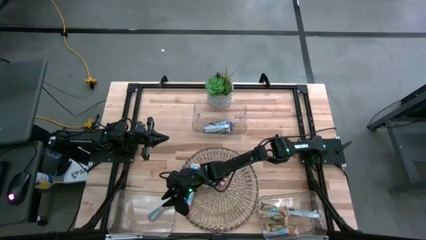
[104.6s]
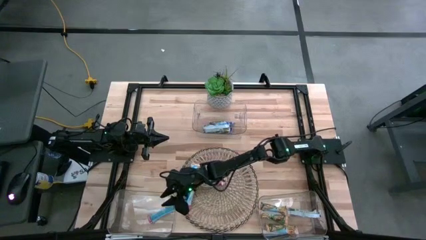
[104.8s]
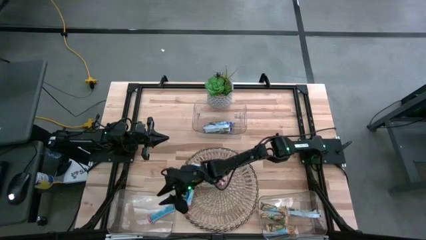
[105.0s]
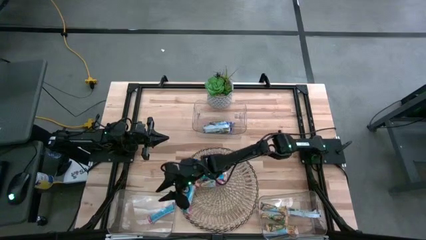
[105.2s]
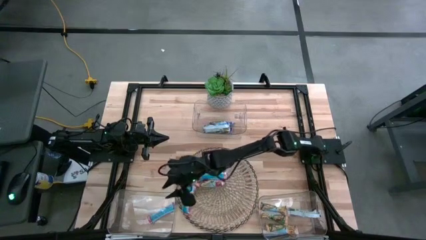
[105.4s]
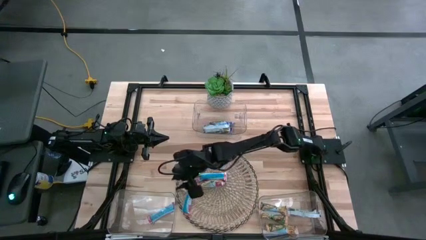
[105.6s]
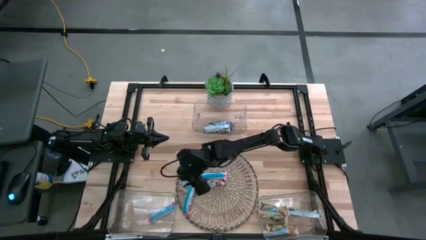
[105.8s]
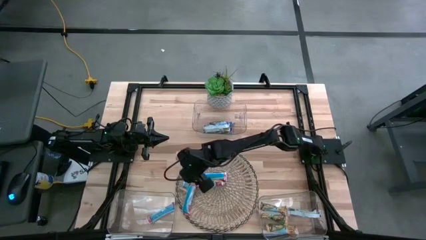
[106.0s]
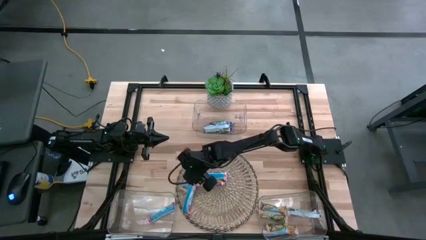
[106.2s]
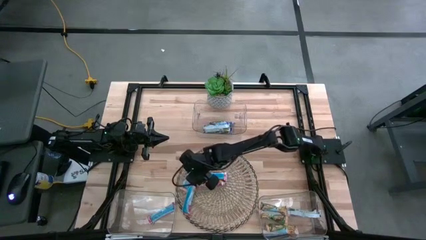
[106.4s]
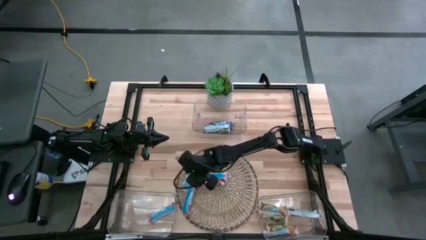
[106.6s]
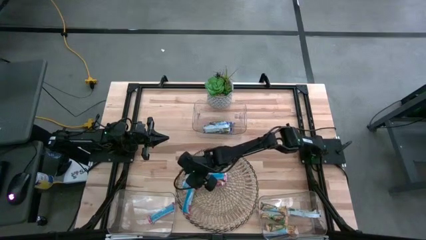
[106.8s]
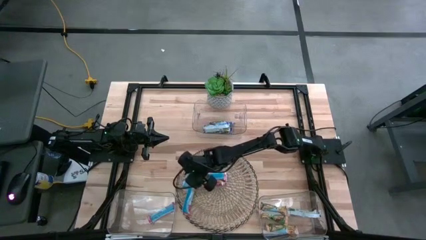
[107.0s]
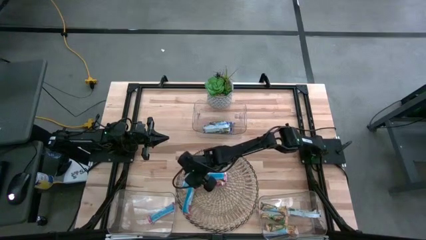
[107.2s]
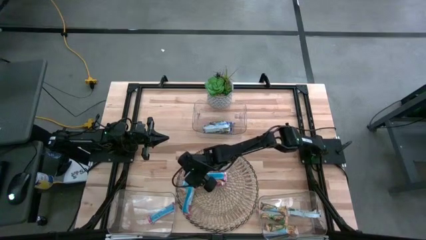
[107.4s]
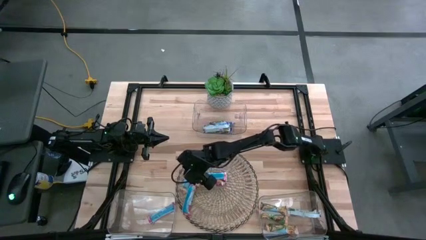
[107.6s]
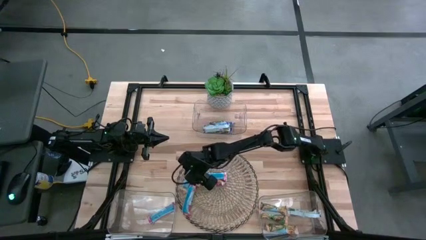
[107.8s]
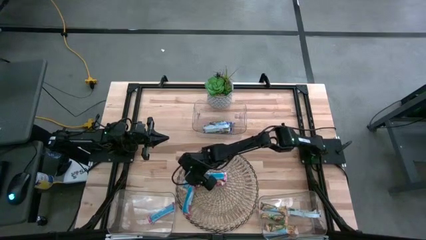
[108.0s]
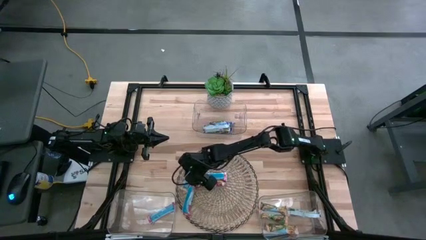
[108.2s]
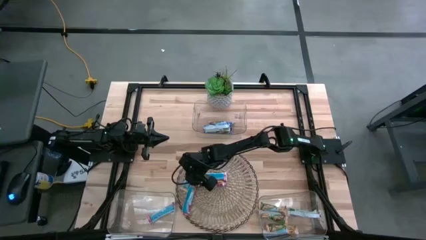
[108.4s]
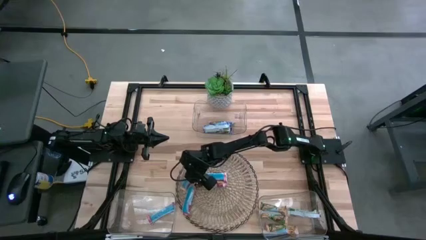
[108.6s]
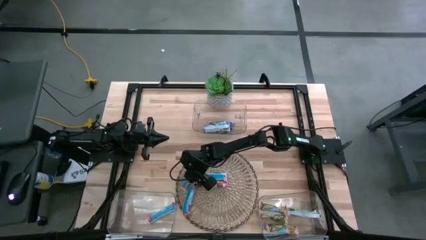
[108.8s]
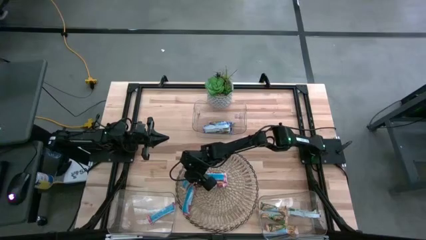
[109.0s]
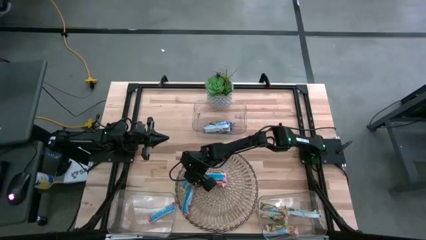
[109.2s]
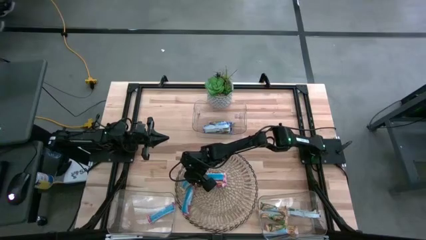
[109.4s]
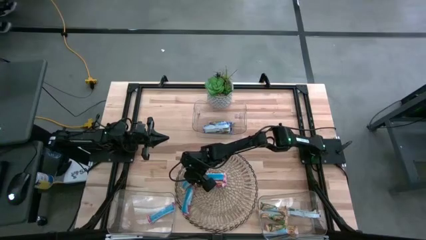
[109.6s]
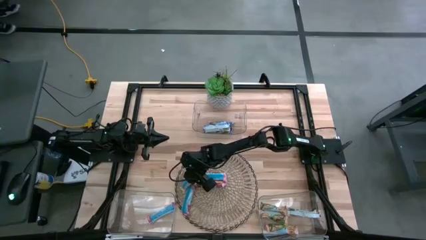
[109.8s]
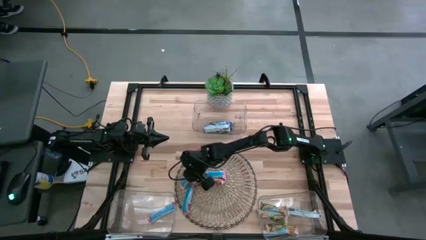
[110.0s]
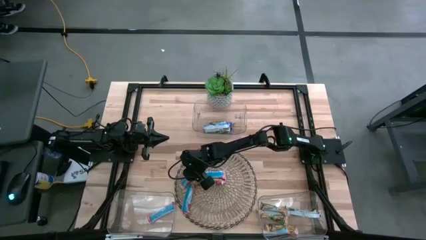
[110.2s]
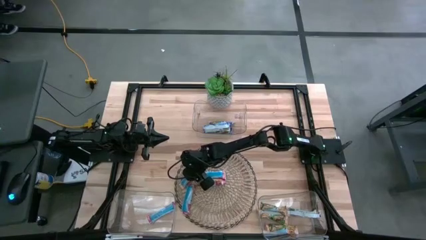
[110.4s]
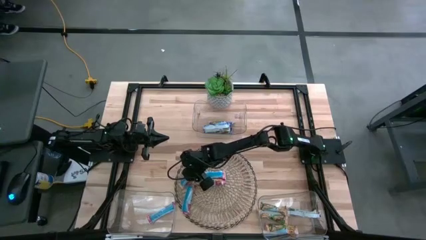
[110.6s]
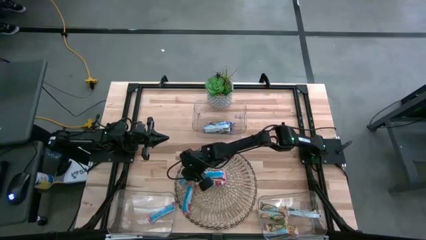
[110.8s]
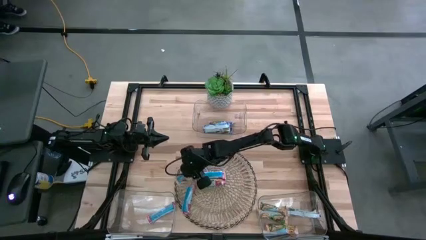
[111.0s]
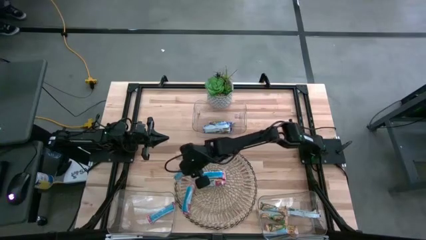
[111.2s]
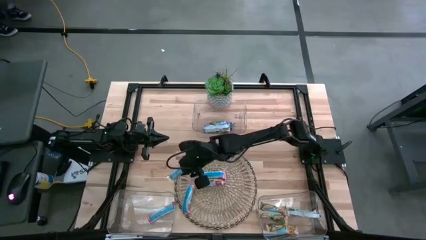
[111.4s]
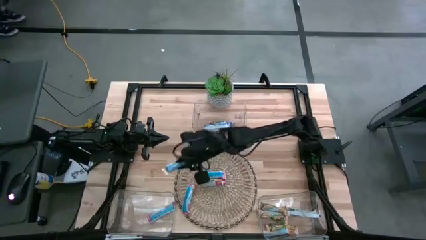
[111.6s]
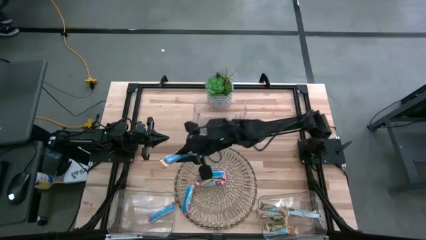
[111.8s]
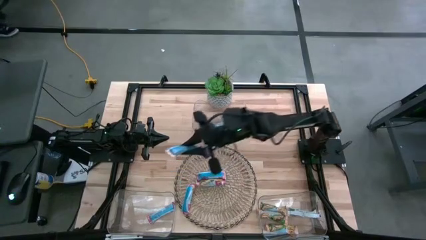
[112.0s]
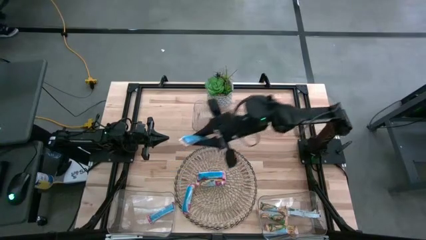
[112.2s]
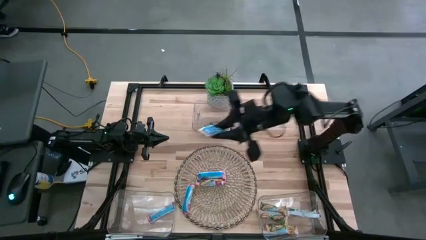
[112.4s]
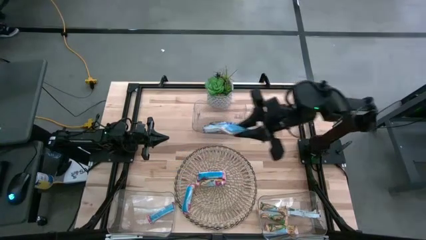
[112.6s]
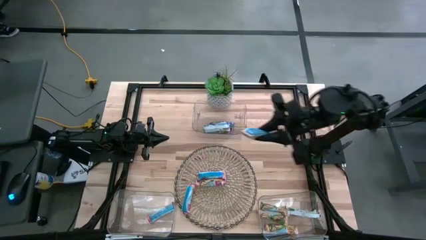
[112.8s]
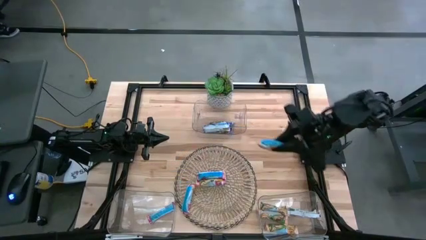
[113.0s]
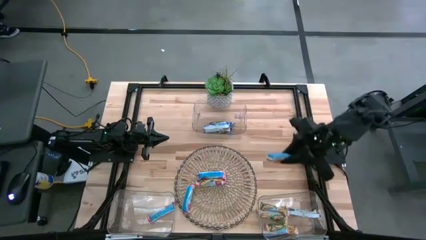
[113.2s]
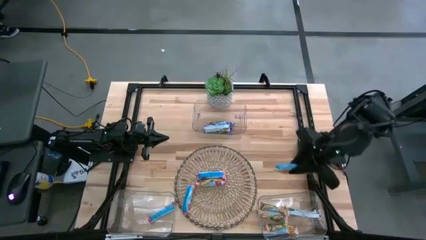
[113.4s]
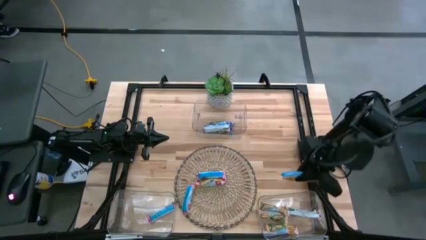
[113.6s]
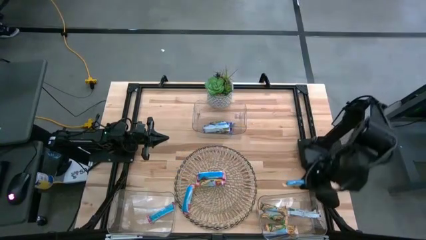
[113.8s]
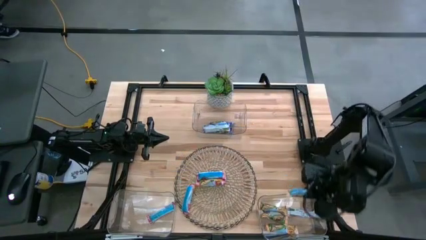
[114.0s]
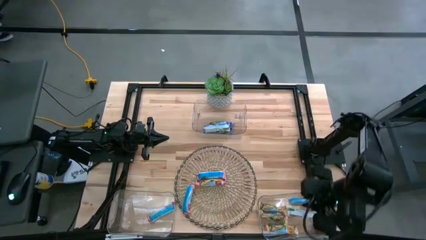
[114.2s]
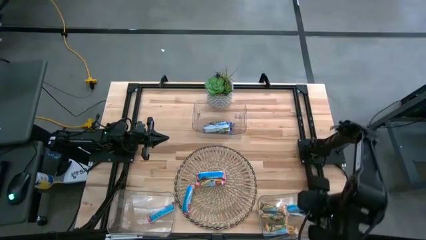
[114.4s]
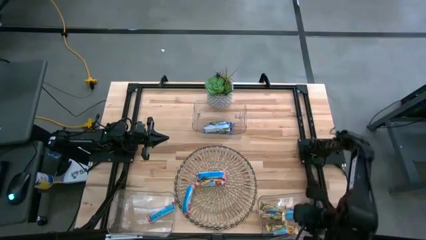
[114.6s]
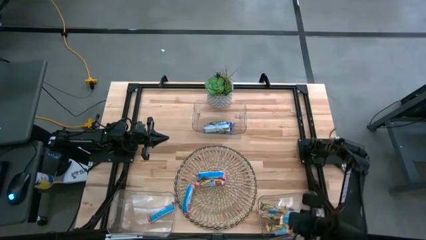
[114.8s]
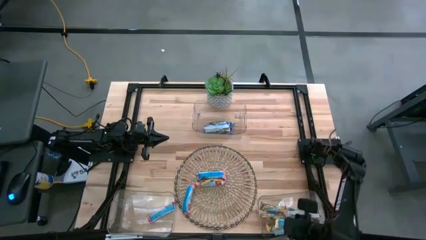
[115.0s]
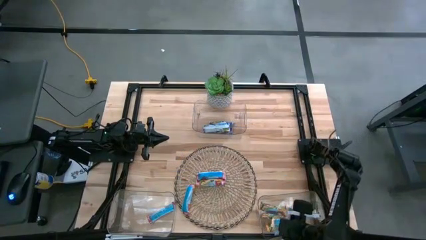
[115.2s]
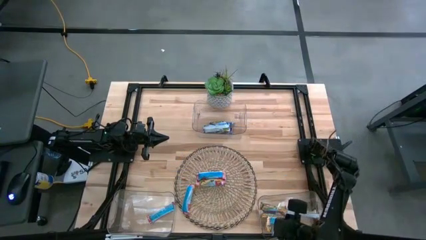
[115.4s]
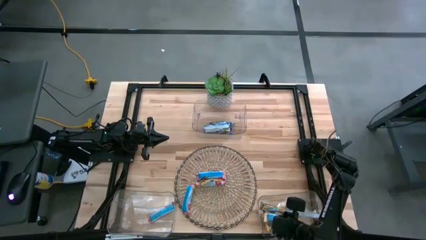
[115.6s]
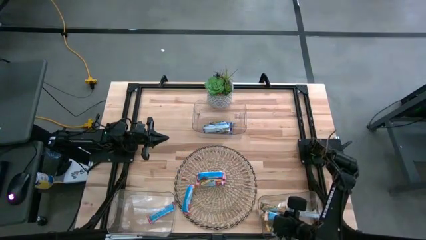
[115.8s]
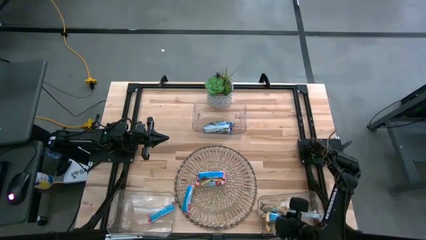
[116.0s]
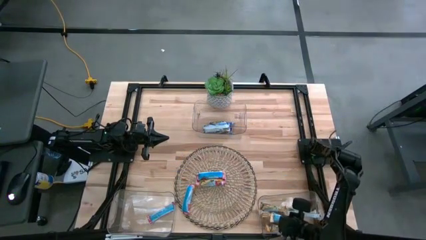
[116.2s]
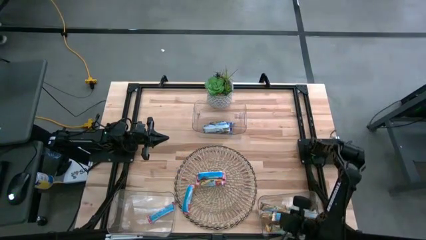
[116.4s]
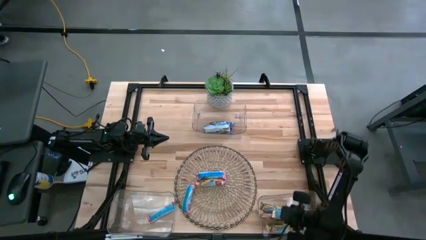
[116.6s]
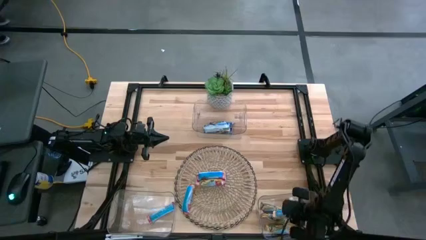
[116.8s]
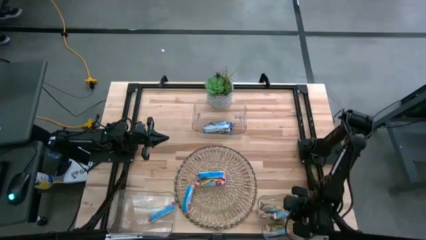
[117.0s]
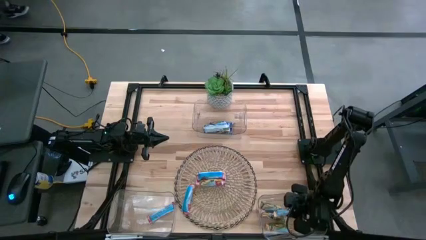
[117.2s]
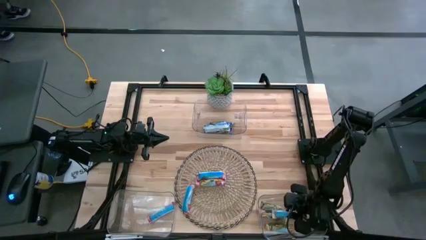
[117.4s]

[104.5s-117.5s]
Task: Pick and place Granola Bars by type
Put the yellow granola bar into the bottom right transparent bin

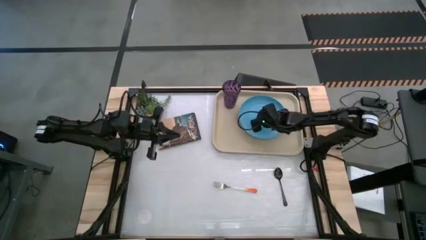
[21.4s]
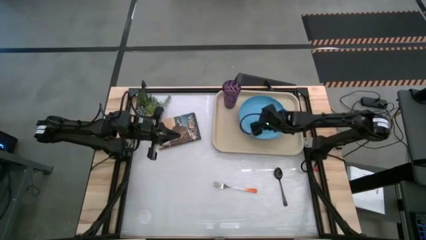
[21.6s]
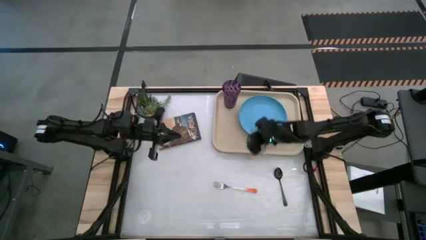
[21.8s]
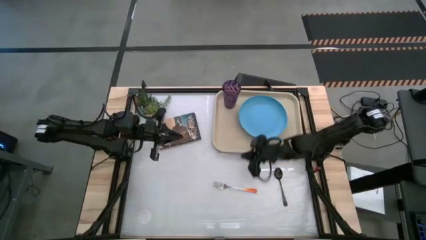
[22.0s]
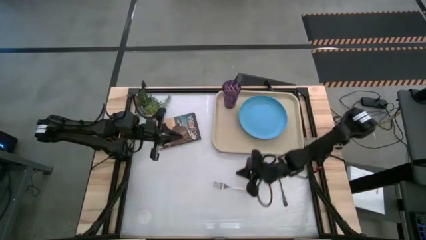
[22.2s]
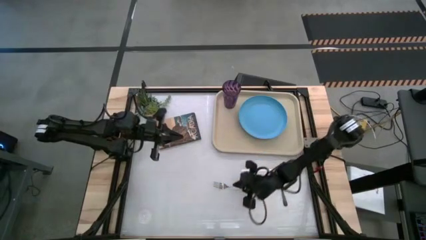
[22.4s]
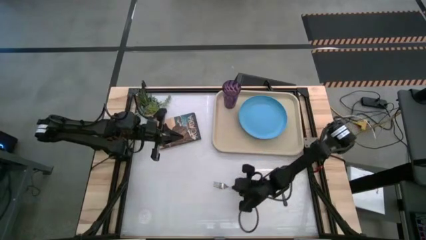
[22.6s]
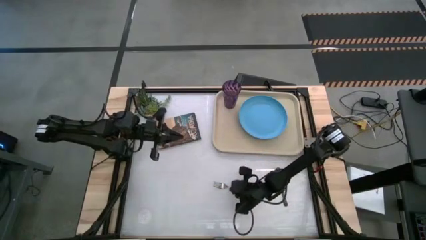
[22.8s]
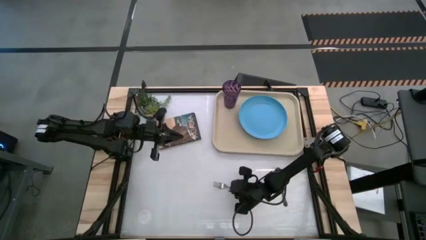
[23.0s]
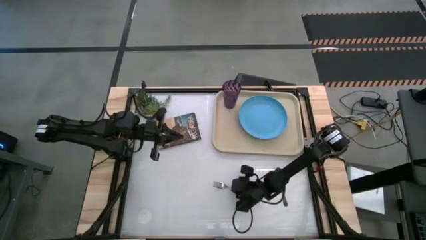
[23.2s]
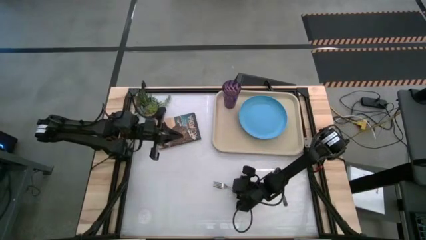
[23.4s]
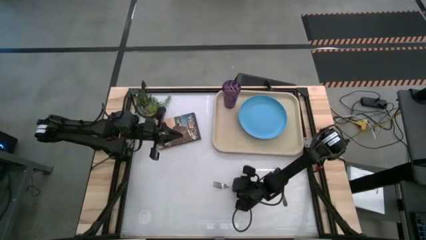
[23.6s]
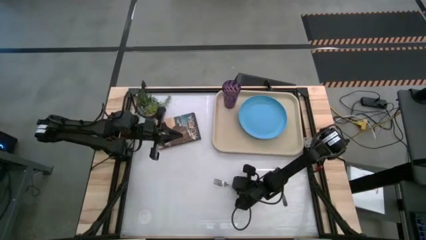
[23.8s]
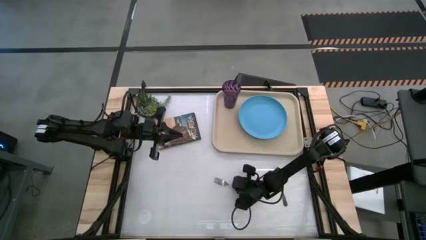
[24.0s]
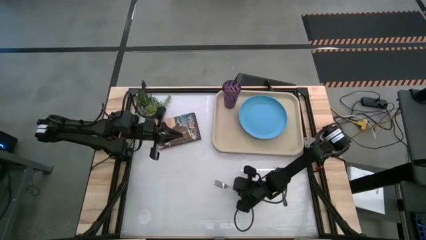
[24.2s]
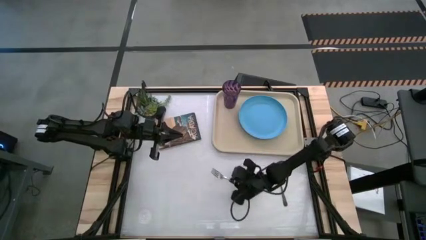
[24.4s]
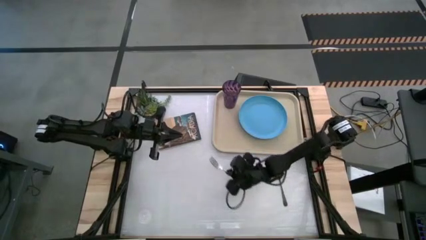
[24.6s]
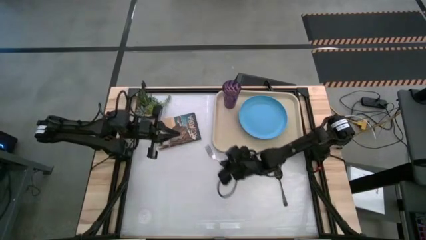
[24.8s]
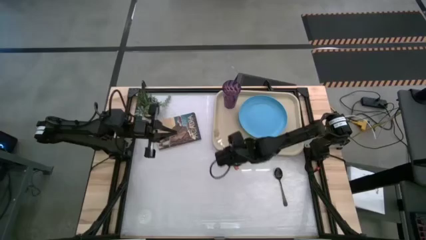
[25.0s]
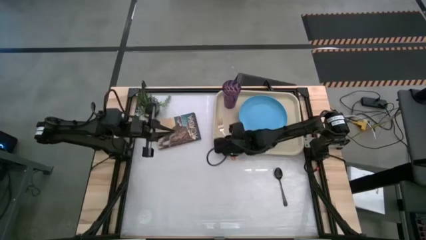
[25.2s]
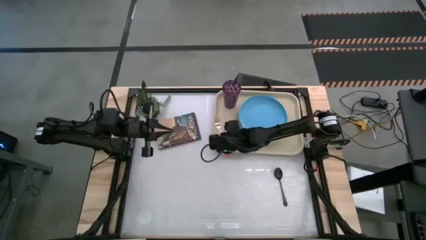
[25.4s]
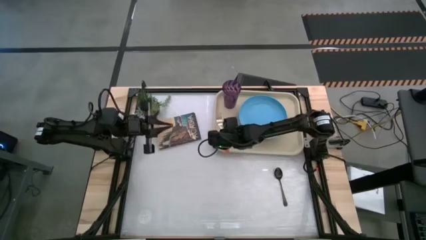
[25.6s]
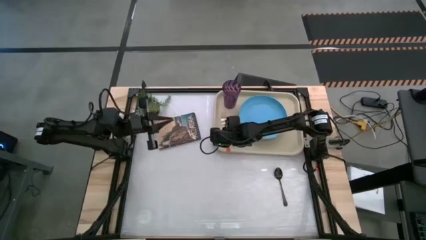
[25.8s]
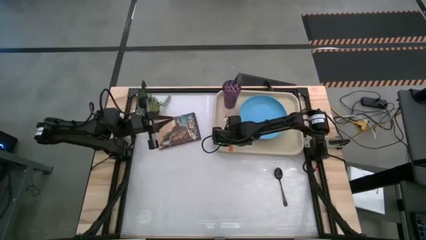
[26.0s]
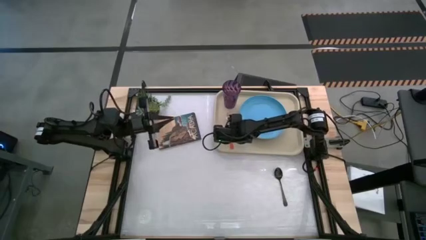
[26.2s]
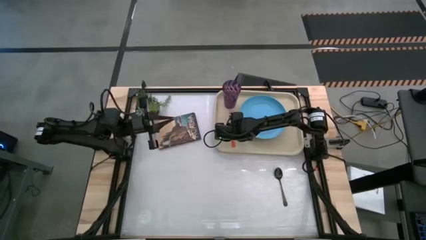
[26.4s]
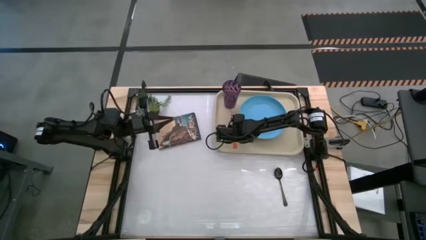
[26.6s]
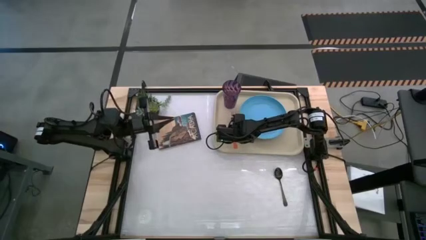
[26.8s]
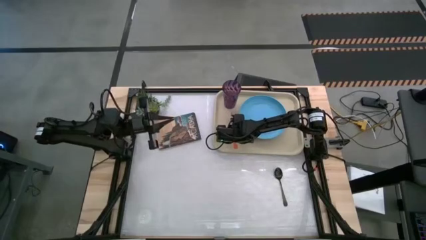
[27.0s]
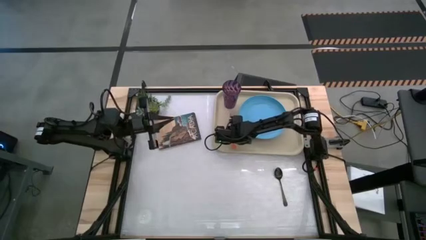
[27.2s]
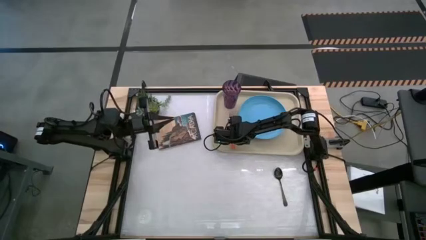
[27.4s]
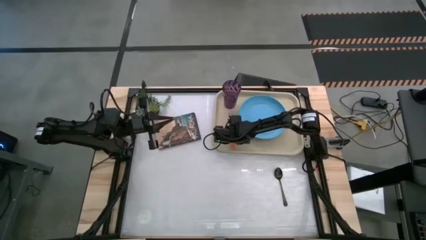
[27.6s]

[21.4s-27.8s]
Task: Pick and place plate/cup/fork/spoon on tray
Put the orange fork on the tray to the left of the blue plate
